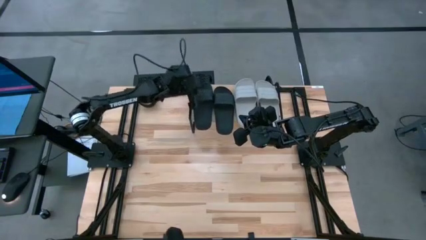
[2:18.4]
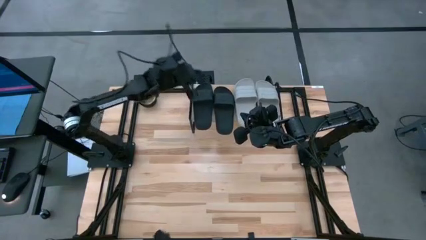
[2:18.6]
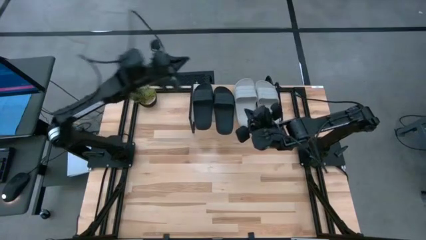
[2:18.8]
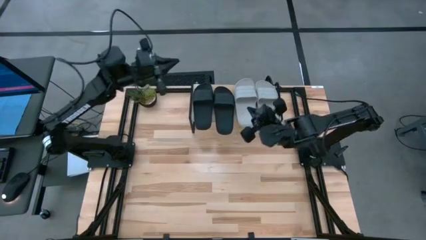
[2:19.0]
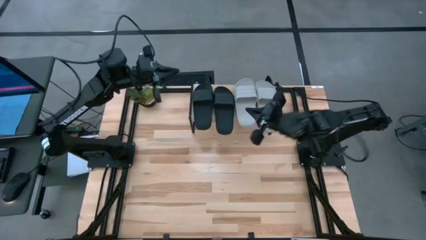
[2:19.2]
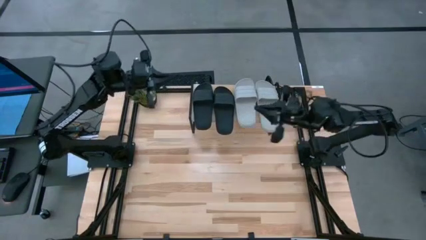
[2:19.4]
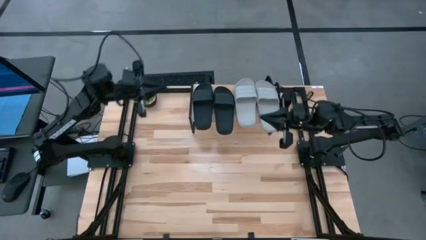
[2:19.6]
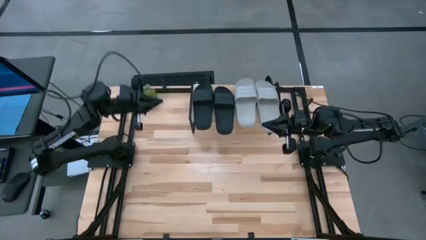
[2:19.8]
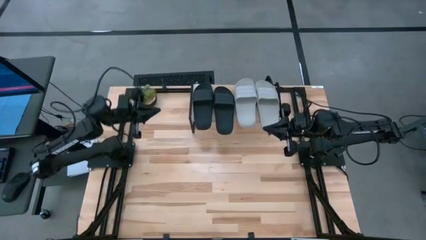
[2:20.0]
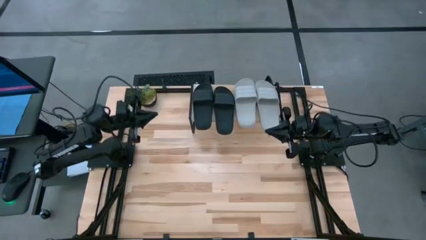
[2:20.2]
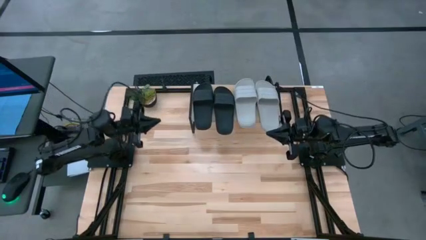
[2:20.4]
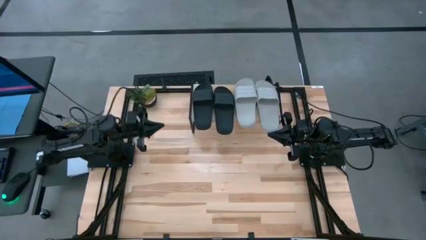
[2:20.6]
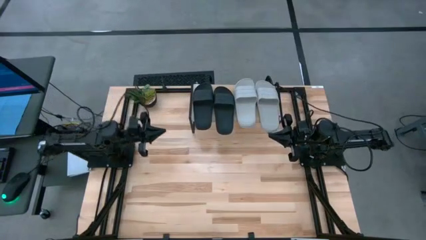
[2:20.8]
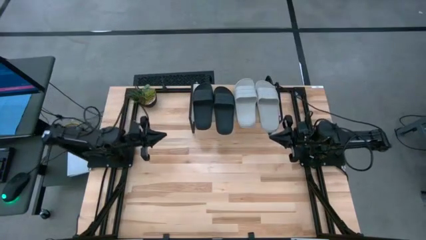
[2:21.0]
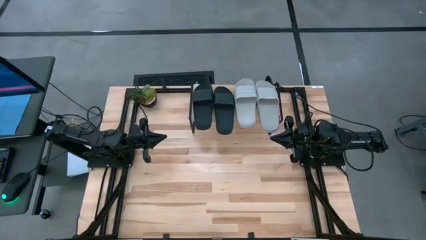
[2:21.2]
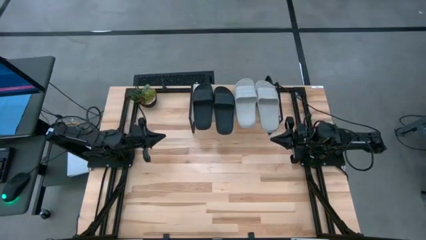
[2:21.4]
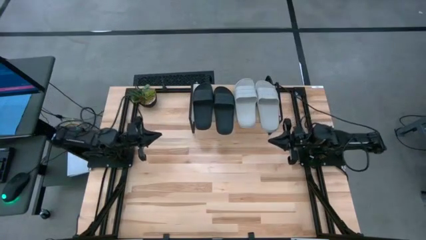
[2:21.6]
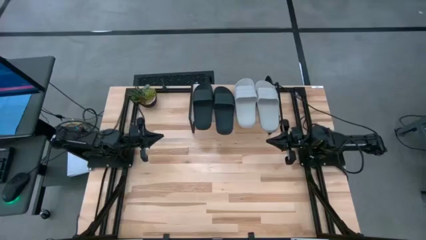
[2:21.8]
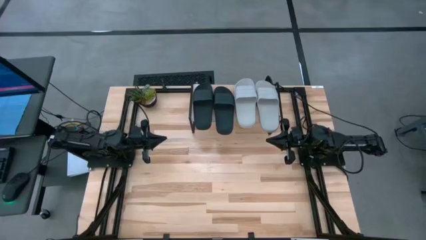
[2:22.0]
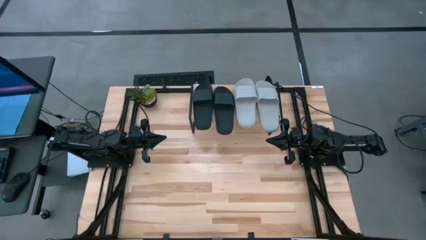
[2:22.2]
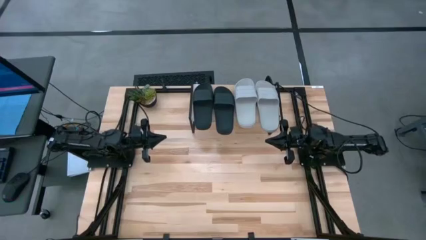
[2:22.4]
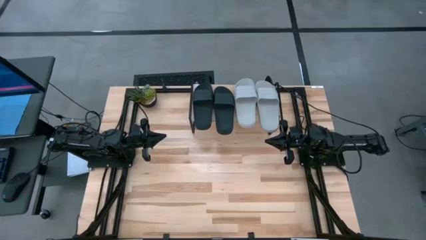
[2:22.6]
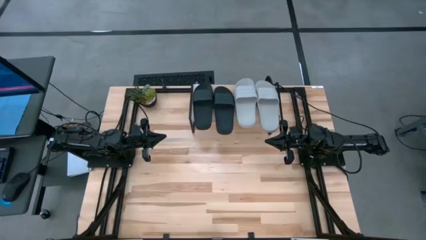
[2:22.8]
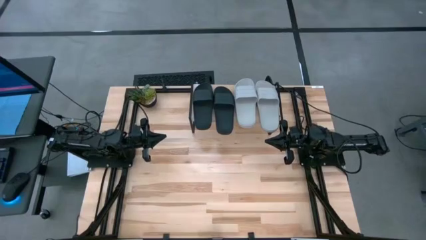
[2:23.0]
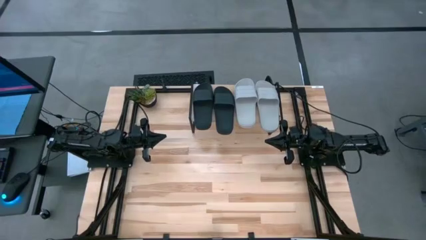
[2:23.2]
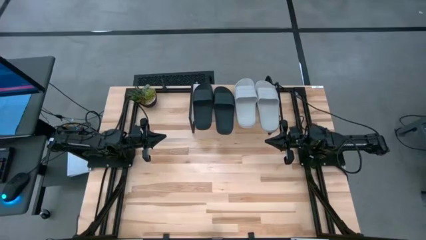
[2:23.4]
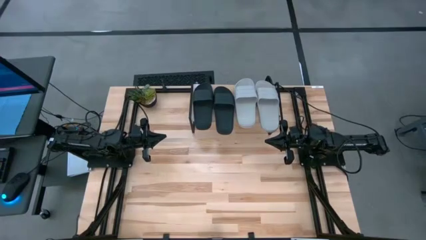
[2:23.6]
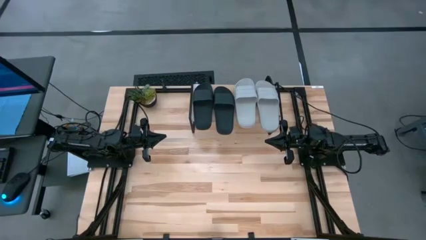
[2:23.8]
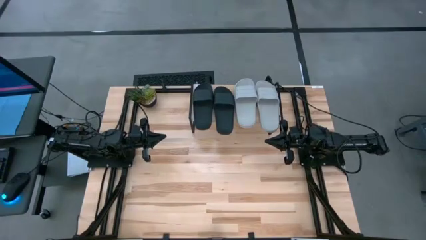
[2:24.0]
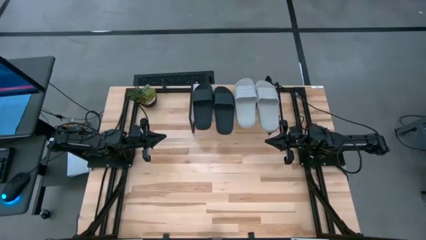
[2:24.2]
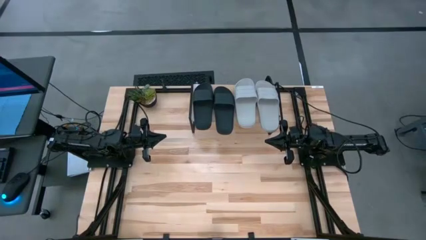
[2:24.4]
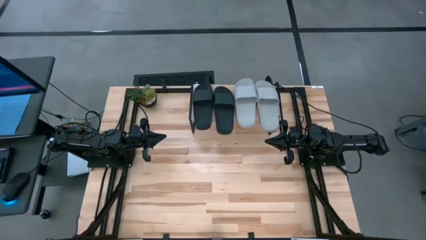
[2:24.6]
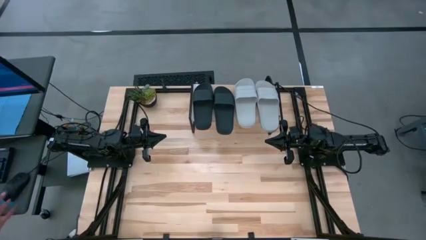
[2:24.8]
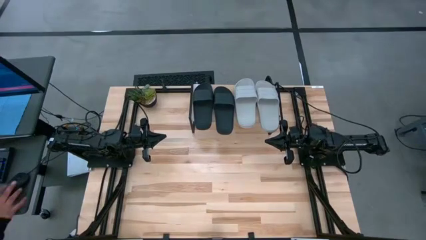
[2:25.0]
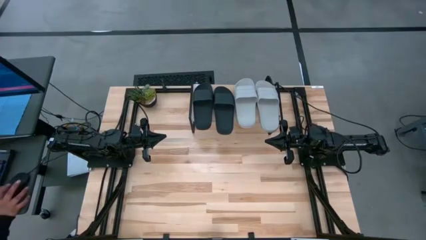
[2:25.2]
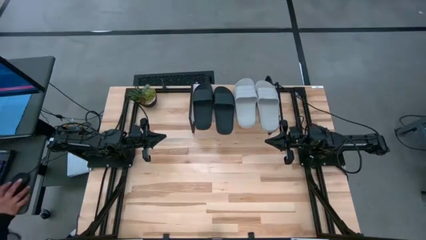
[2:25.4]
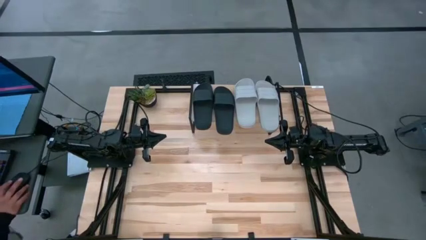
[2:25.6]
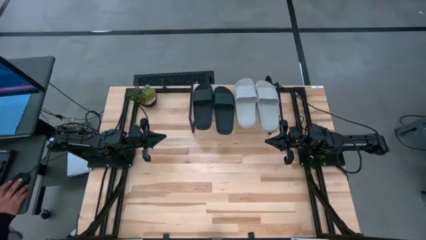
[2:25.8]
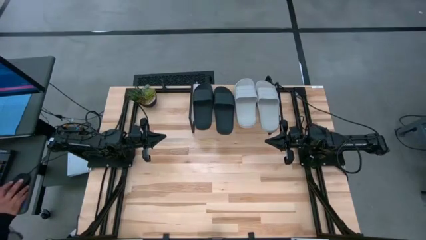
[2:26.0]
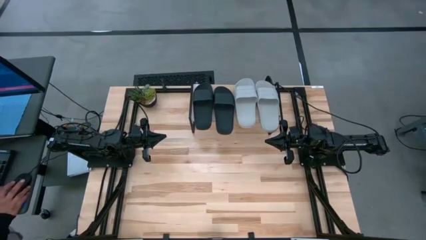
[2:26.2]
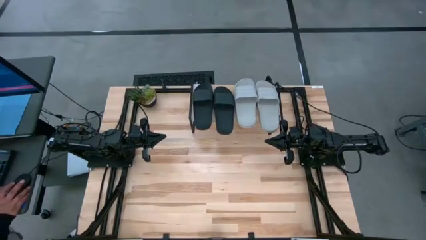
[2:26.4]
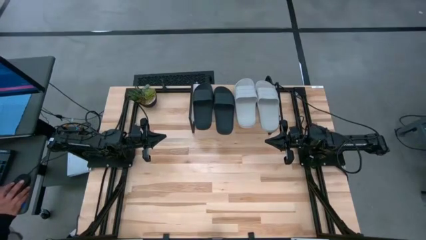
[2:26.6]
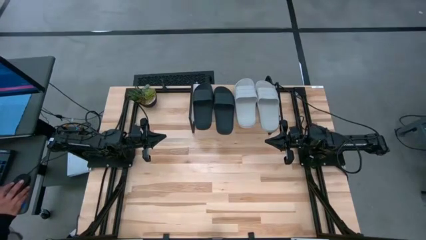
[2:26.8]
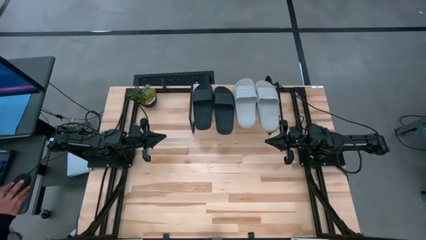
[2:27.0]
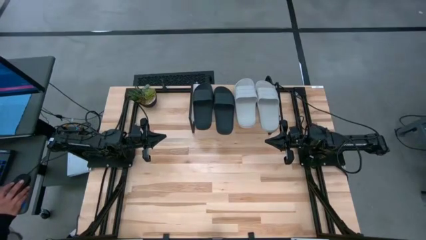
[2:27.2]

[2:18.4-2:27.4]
Task: Pick and place slides into the shelf
Return to Home Position

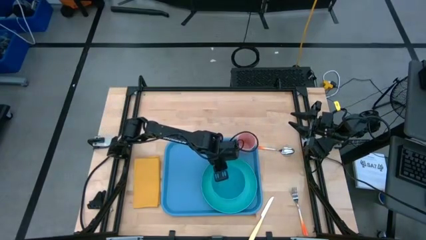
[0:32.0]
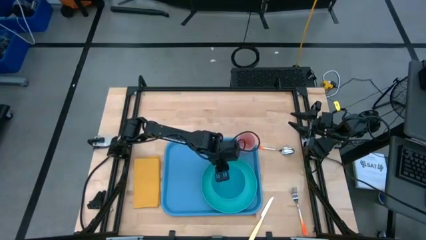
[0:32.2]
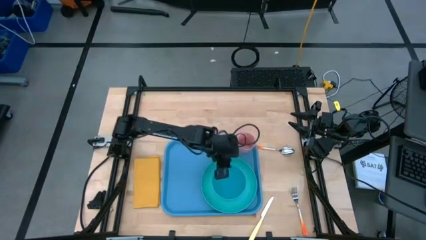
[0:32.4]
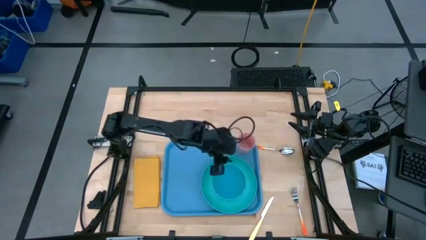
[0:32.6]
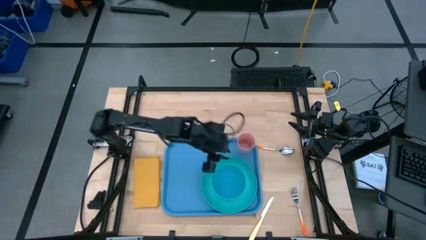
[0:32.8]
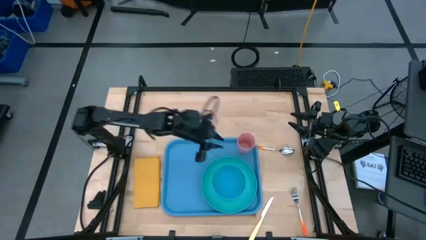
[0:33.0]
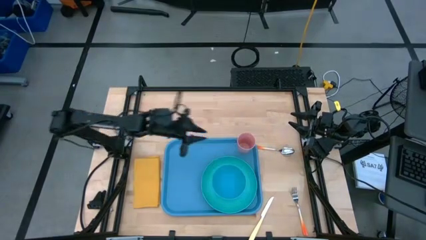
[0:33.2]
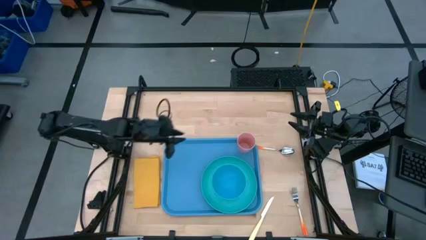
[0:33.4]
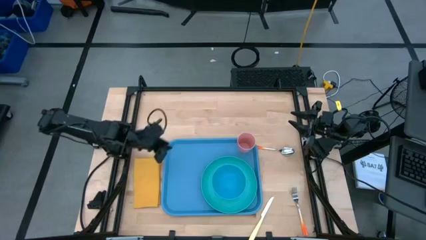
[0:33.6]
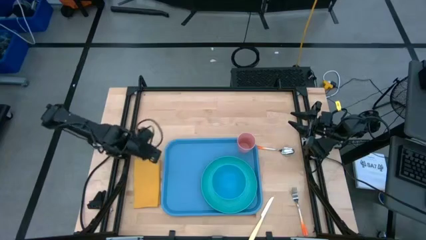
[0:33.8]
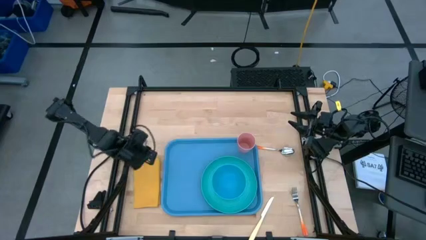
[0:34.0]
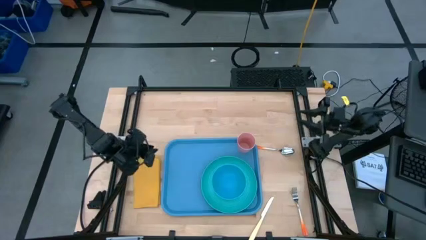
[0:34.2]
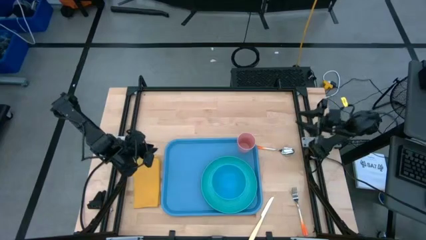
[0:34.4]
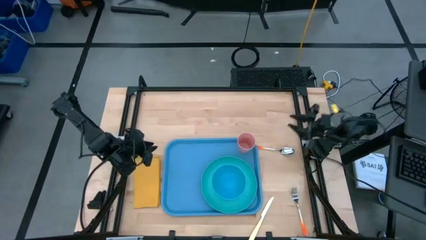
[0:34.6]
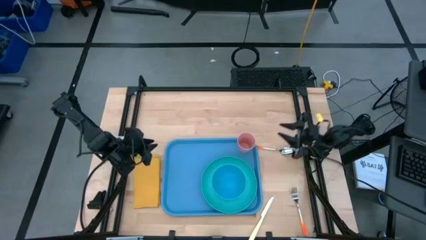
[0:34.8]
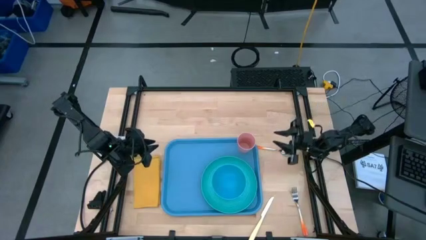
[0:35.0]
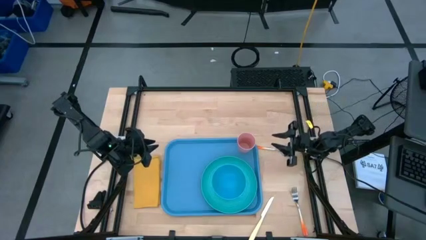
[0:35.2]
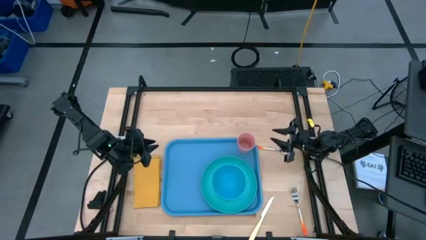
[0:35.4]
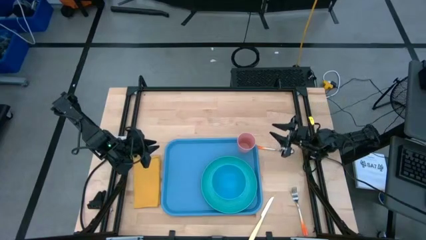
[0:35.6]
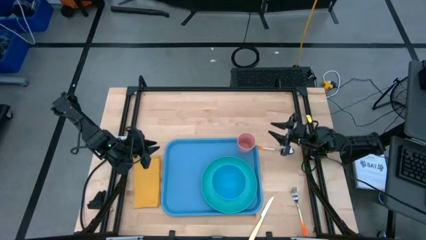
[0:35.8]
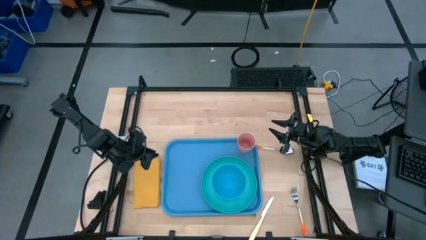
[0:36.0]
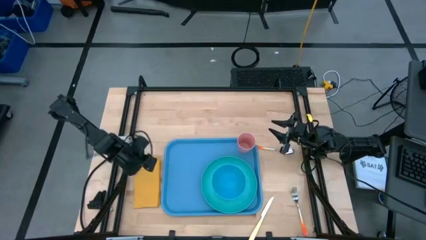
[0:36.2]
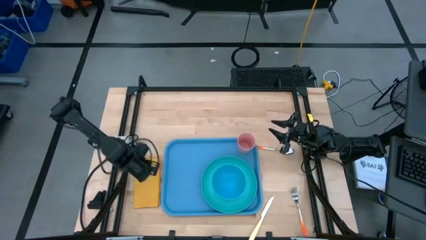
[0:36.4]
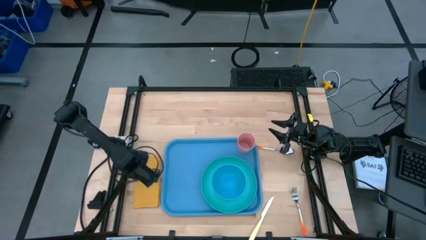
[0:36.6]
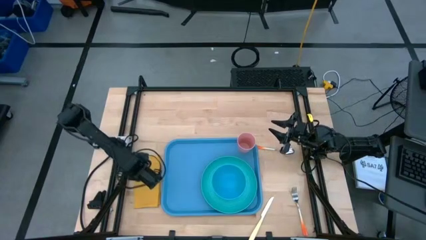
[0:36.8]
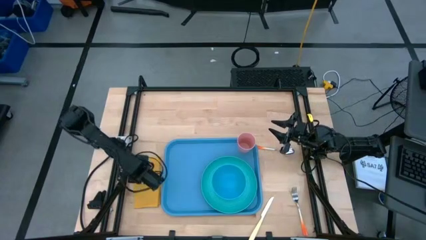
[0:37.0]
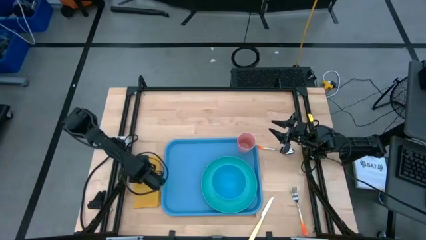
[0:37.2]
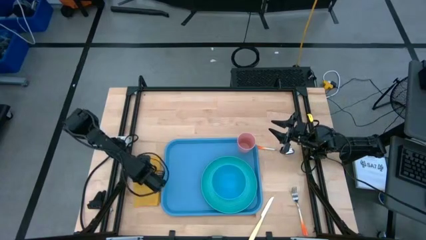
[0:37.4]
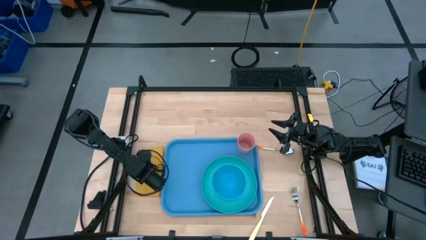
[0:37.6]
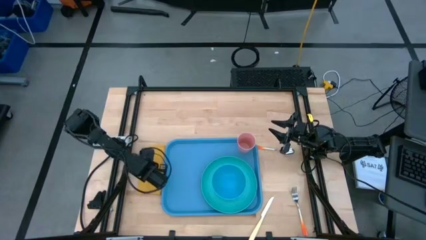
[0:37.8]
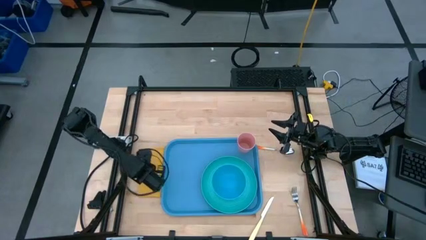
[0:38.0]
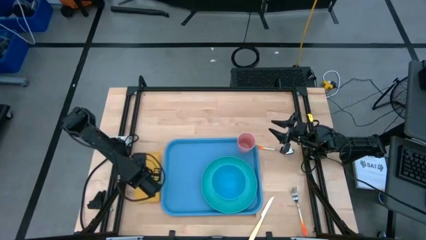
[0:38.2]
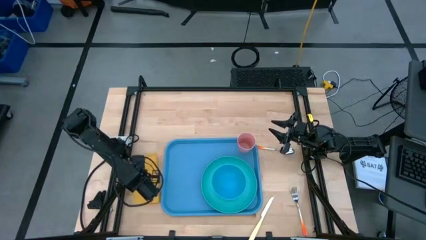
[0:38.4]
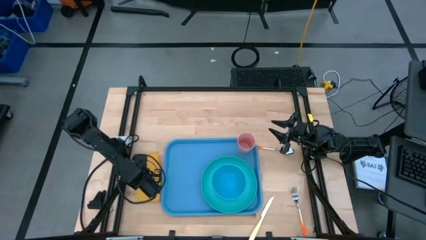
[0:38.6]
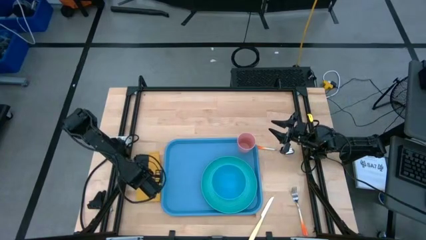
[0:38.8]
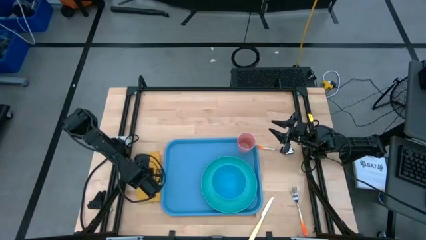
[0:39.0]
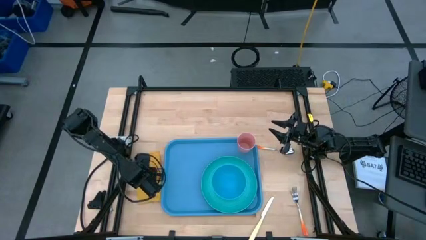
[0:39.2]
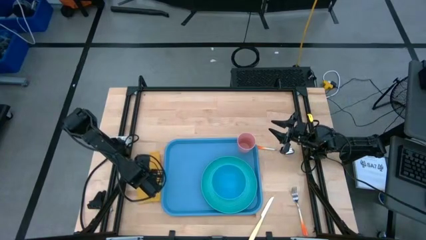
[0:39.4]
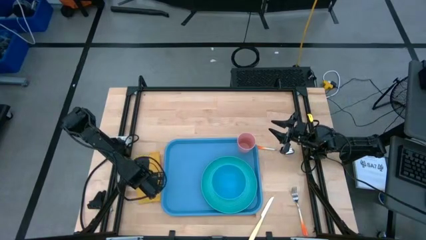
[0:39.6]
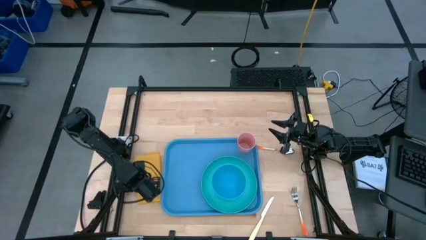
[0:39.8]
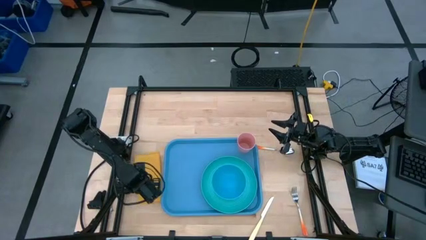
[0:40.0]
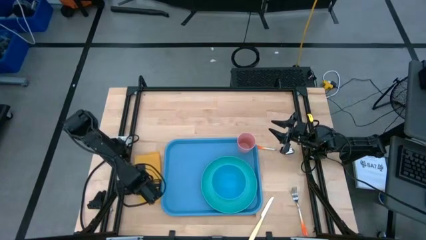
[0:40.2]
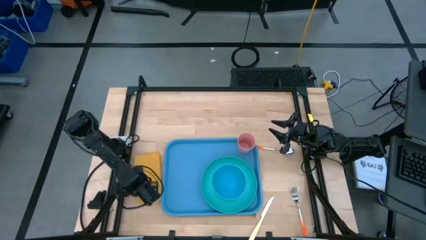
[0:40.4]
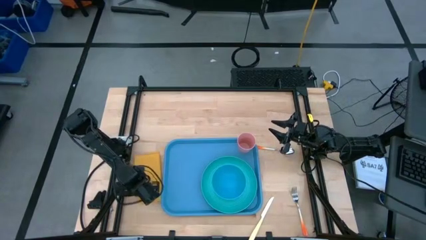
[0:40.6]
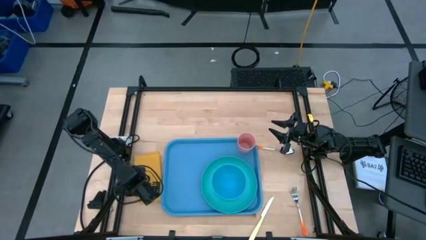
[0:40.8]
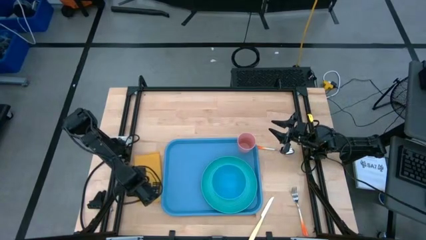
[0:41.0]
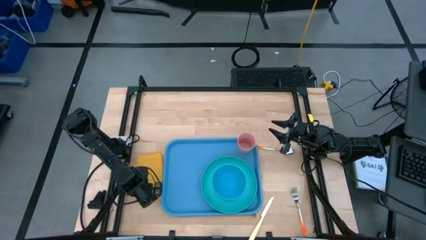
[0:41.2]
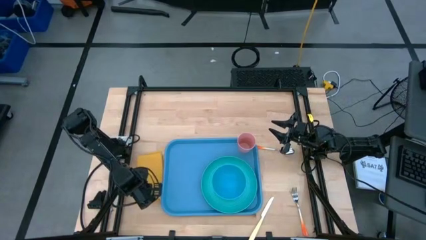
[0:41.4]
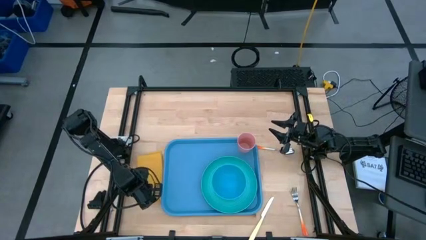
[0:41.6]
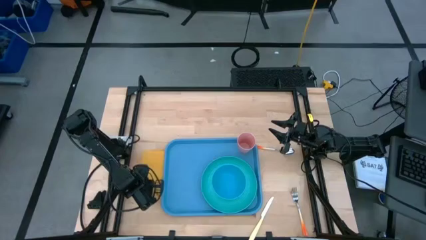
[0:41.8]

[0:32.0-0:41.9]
Task: Set up tray
Put the yellow napkin on the blue serving tray to the left of the blue plate
